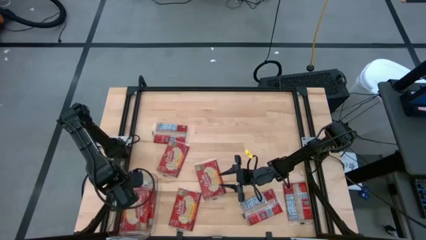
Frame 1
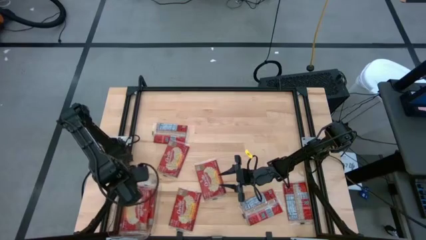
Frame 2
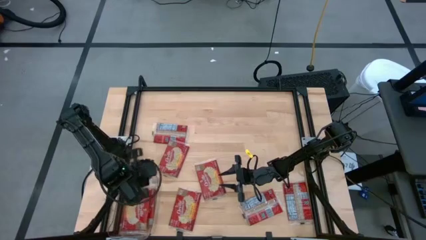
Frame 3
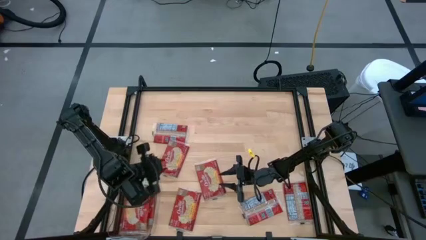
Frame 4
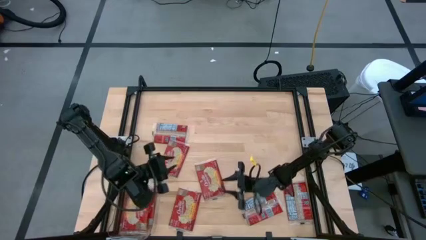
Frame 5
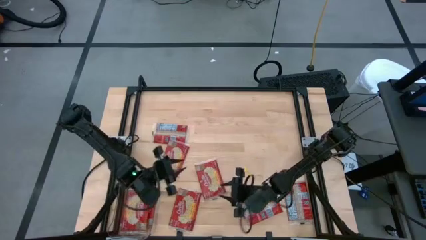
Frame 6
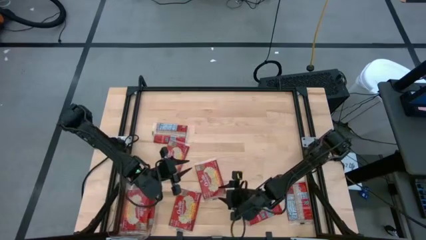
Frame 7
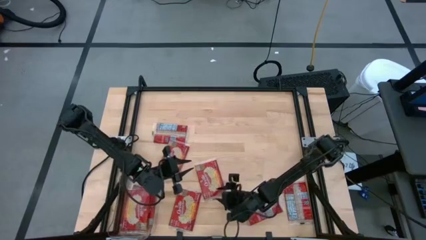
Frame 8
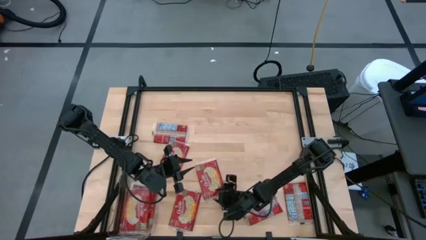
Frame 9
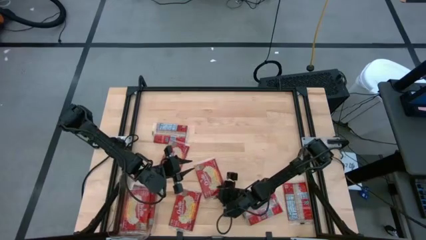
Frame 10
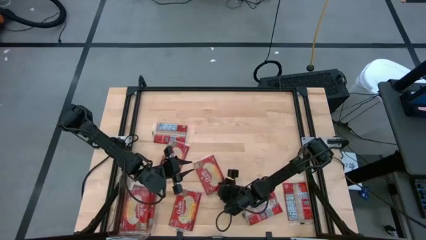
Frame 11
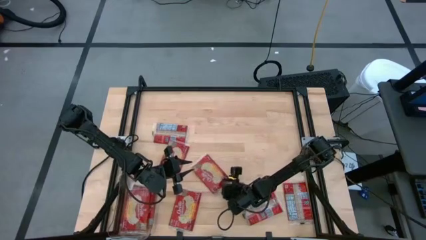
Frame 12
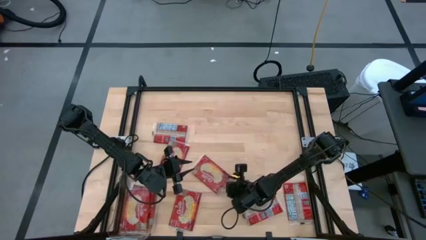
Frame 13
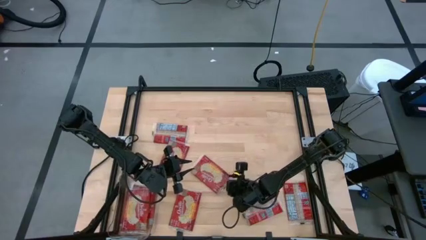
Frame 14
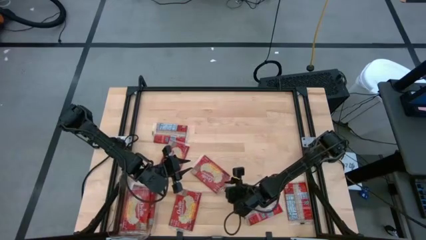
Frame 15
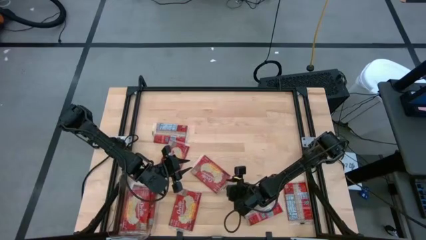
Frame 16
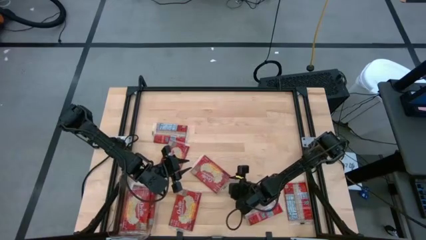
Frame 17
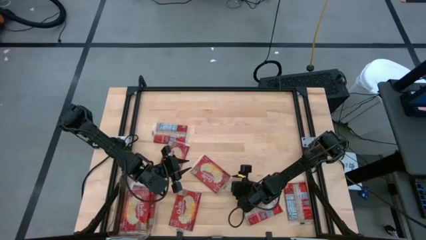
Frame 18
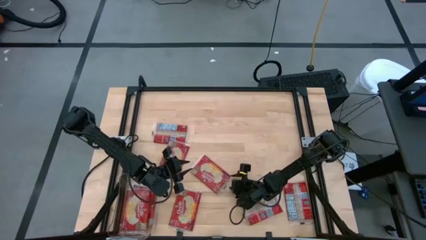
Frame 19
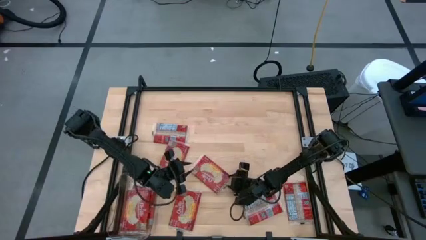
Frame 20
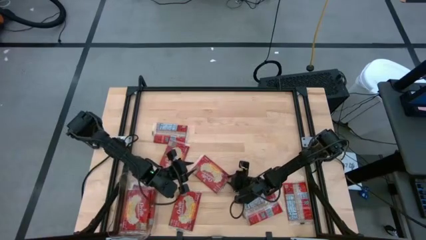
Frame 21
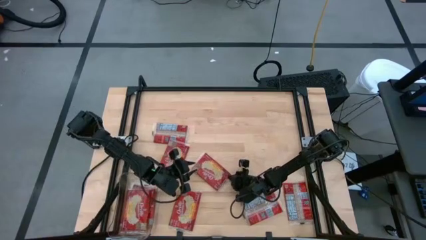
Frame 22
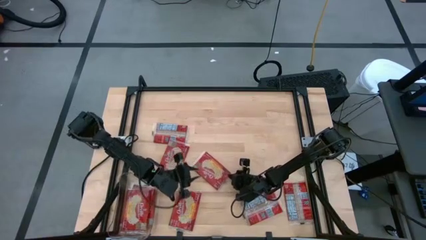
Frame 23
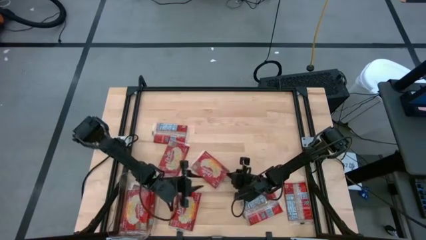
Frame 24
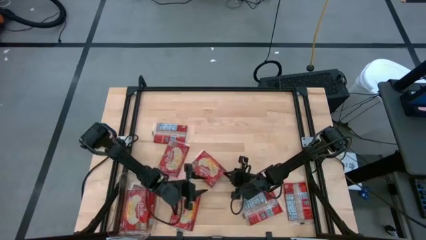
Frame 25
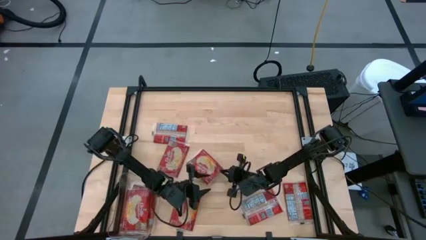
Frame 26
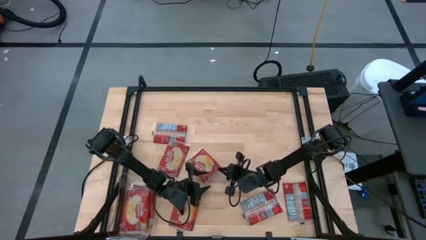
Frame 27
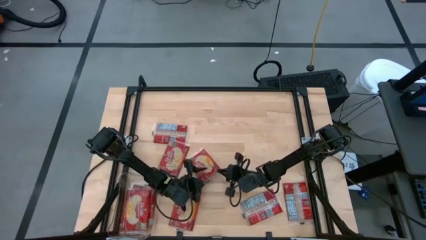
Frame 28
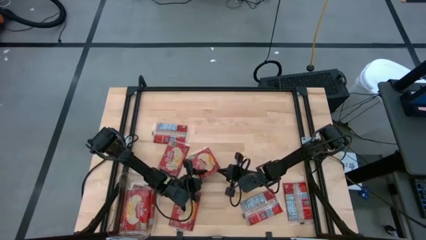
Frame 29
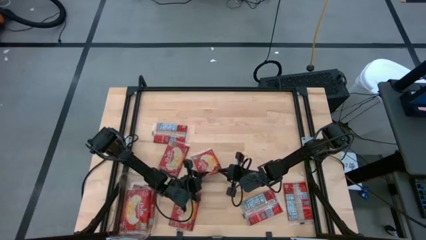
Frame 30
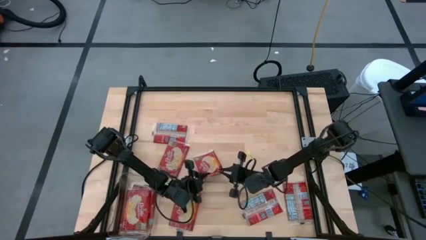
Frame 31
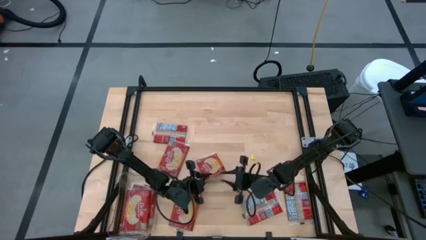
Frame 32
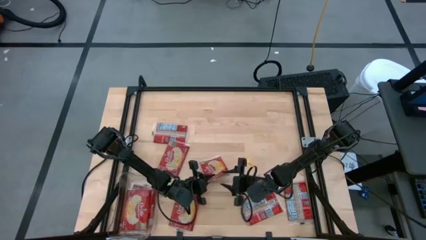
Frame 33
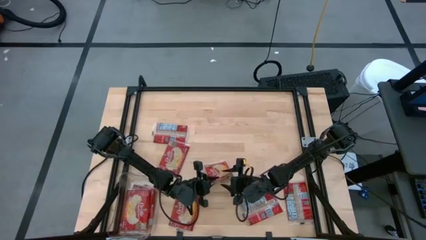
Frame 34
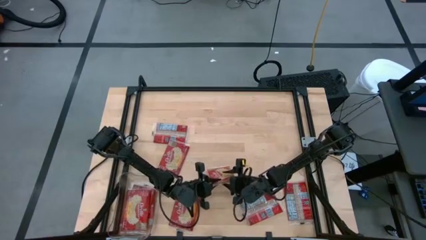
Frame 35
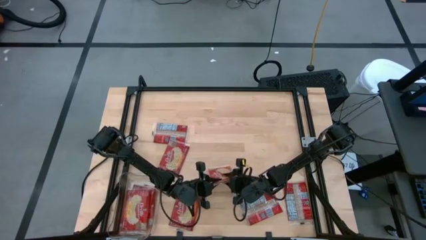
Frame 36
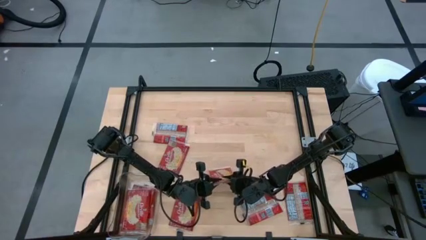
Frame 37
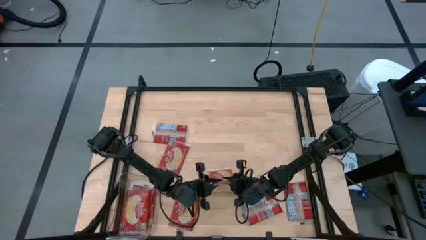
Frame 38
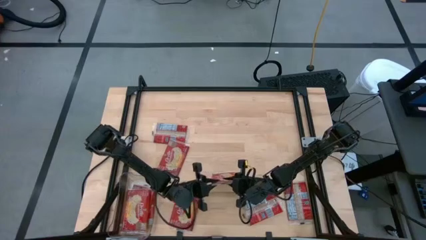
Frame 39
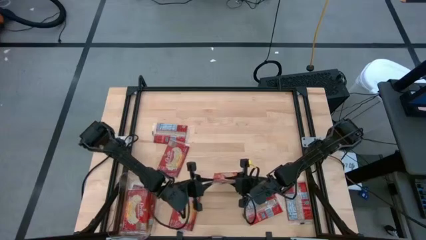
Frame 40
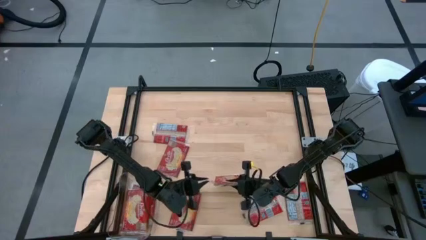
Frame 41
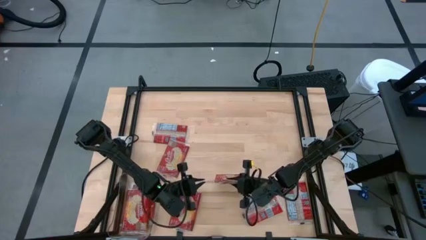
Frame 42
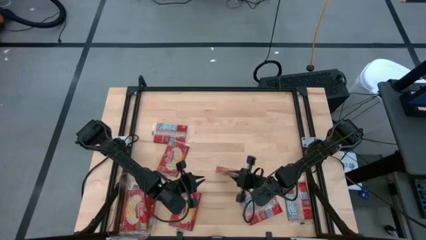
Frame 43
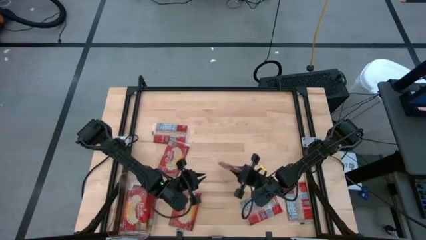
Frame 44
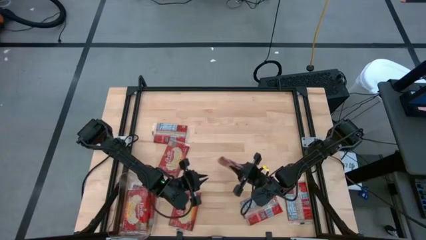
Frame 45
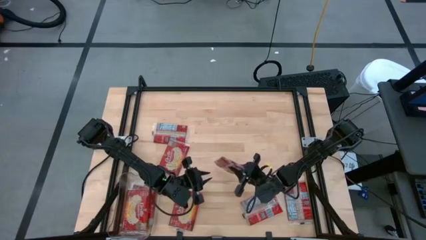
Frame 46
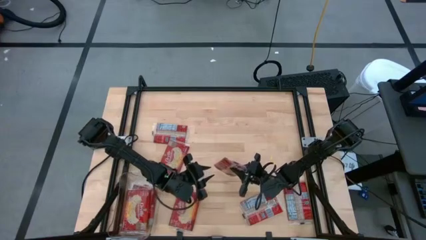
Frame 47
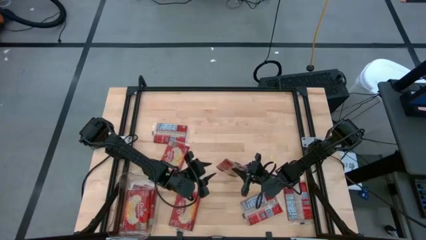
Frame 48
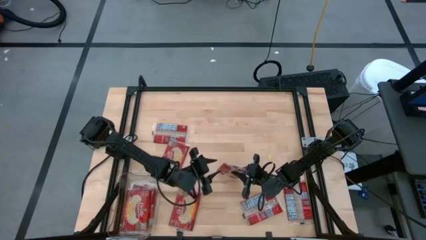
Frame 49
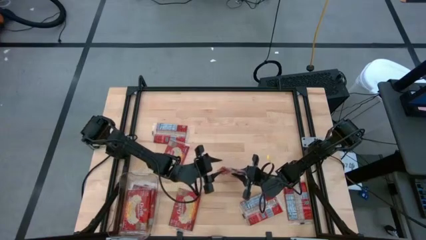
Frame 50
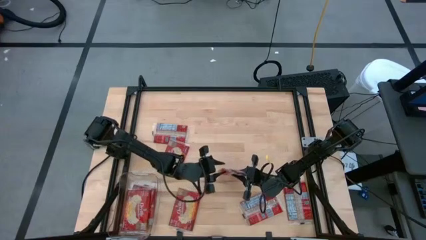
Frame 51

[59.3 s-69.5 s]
Task: Sort popcorn bags into baskets
Put the popcorn bag into the transparent bin

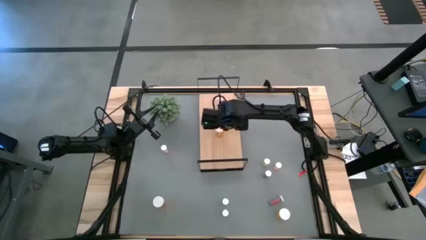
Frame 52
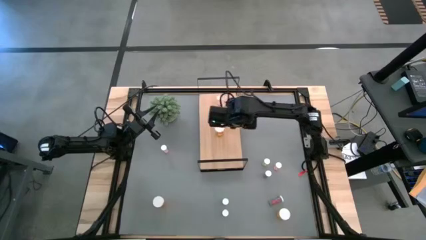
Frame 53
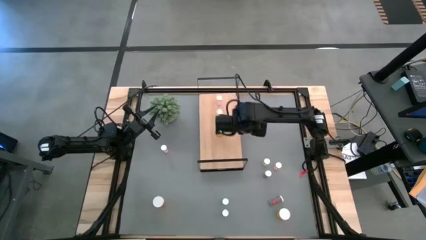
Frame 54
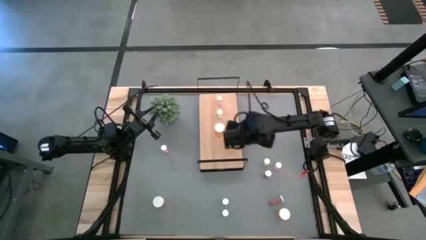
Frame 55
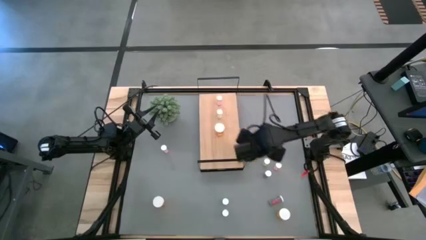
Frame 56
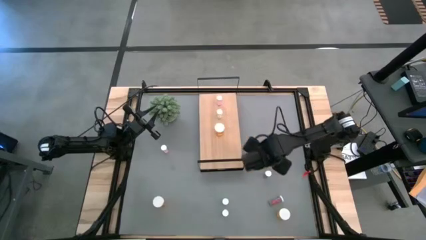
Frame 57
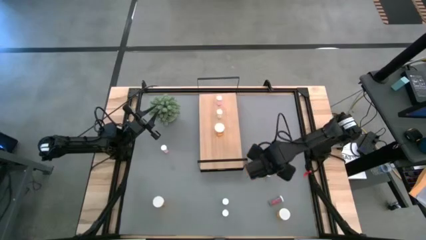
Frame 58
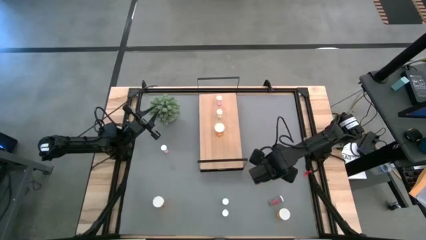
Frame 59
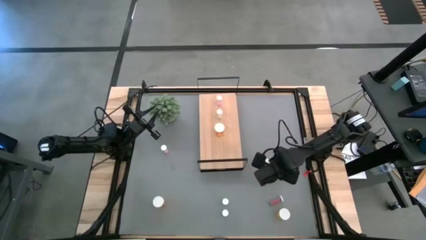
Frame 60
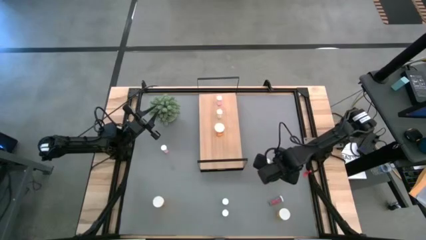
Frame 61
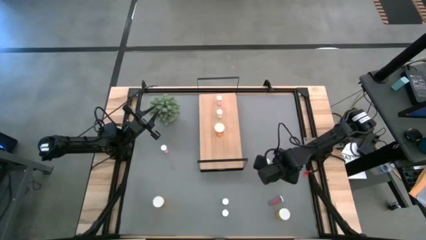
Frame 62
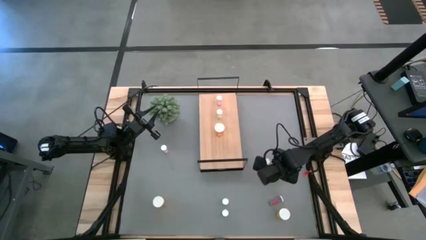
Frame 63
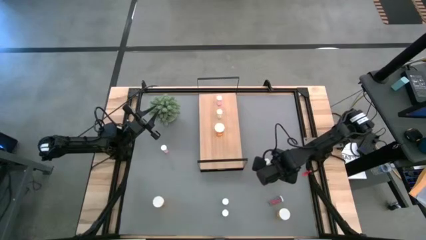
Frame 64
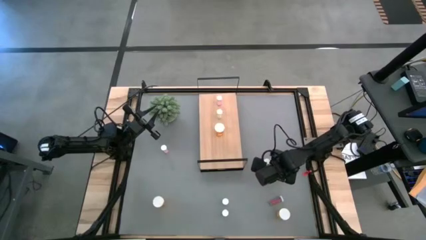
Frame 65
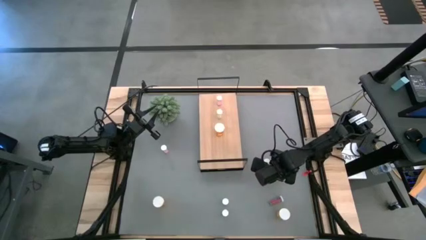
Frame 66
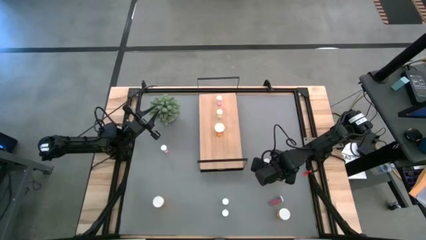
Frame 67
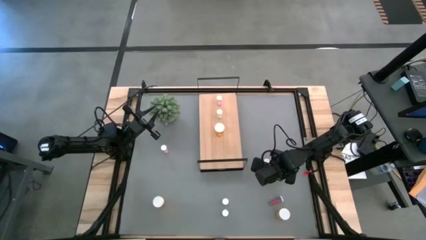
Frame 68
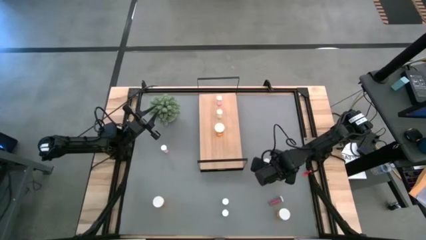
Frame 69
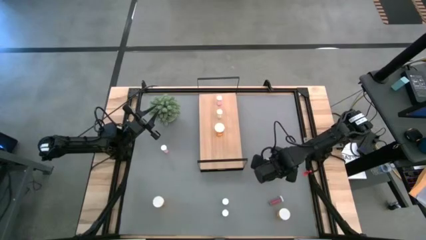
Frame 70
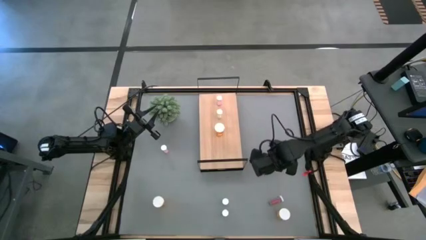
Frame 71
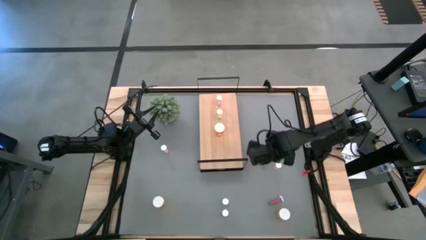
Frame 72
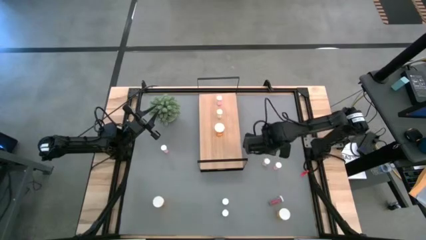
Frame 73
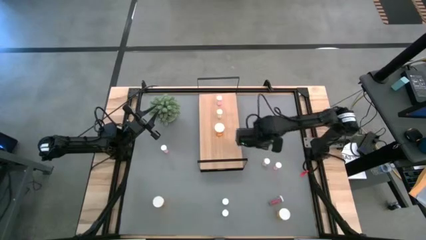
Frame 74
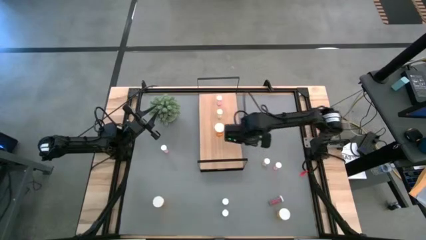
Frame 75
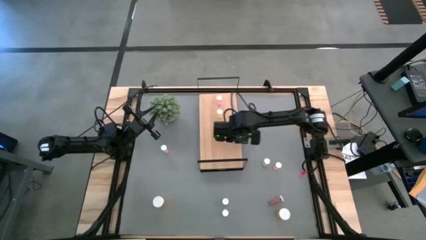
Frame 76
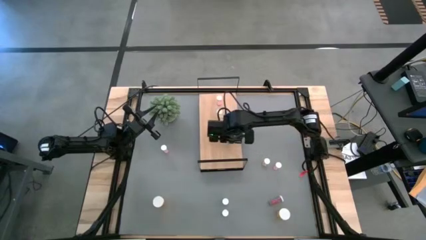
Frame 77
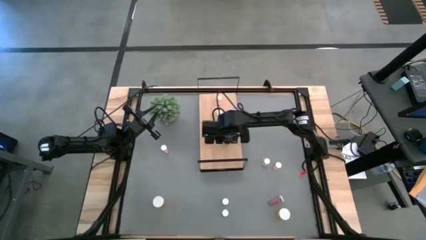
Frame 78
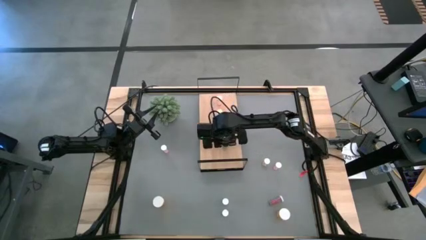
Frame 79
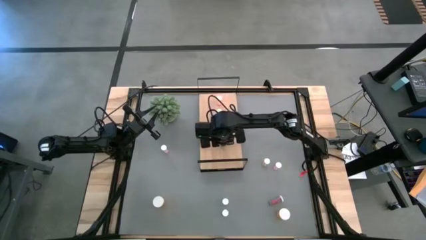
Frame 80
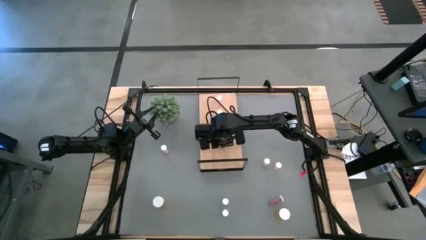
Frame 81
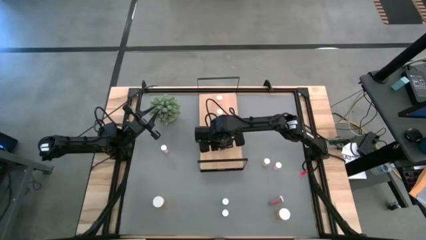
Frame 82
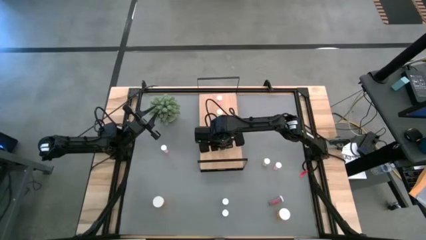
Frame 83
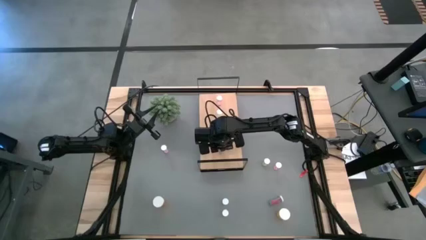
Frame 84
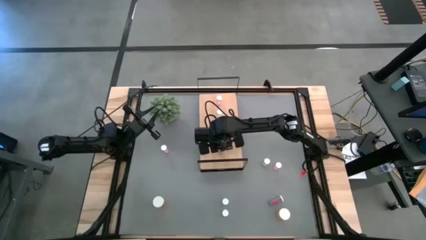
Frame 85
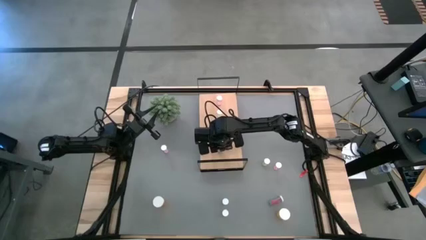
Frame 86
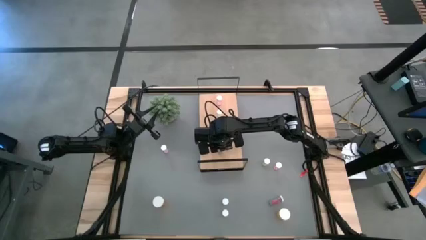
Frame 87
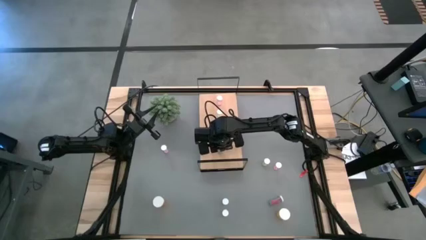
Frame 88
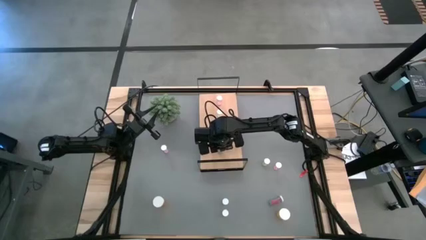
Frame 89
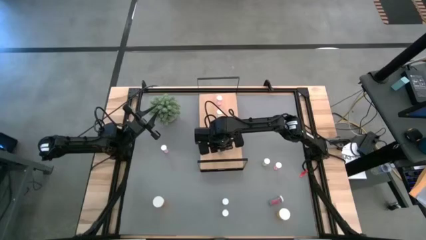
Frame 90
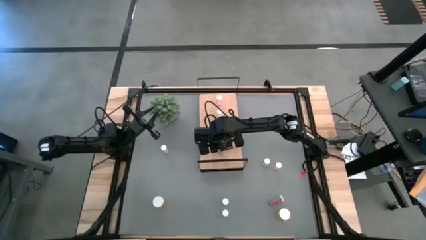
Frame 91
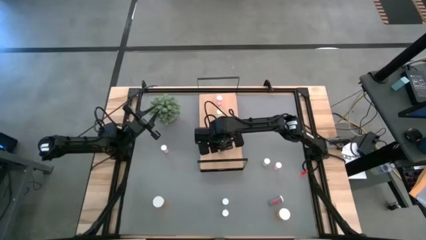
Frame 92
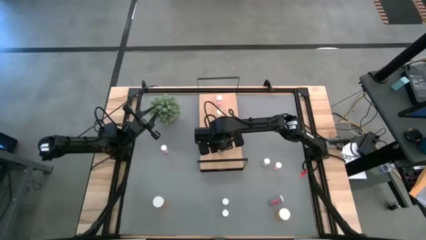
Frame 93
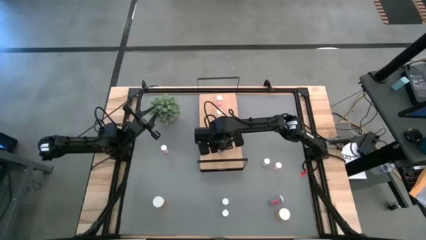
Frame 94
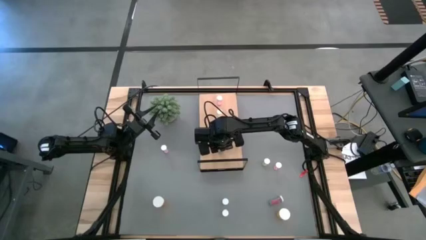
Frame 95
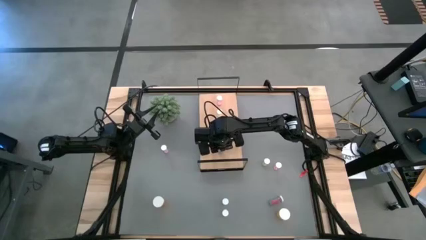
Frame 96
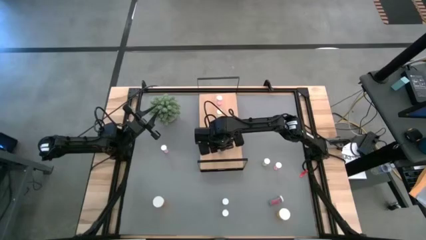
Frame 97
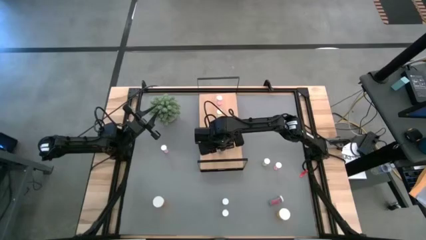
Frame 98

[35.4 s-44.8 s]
Task: Pick and place medicine bottles onto shelf by color
Put the top blue pill bottle on the shelf
